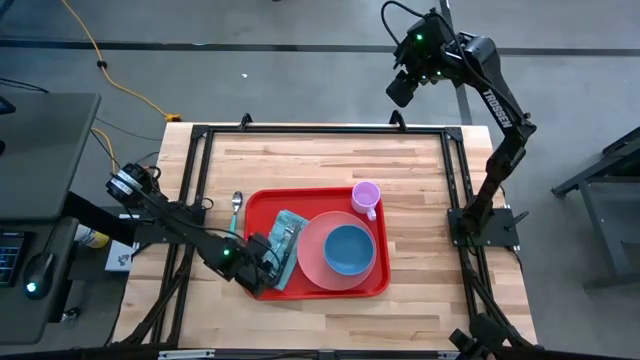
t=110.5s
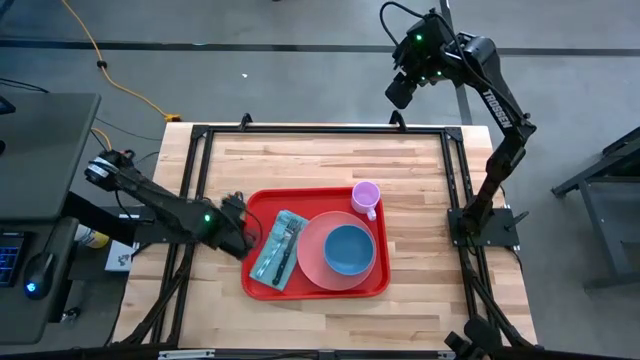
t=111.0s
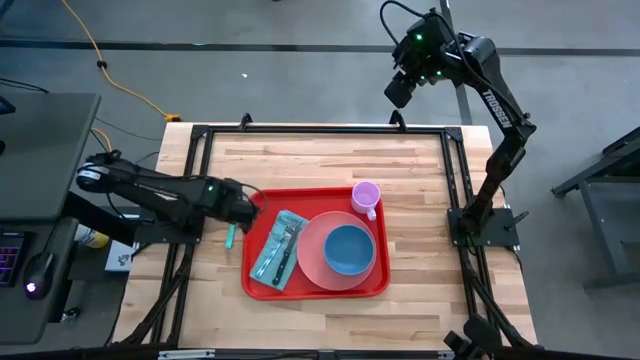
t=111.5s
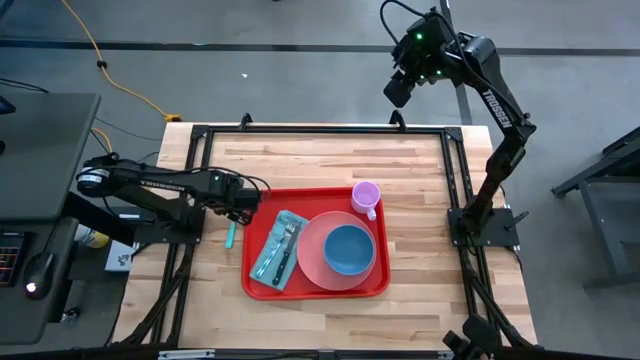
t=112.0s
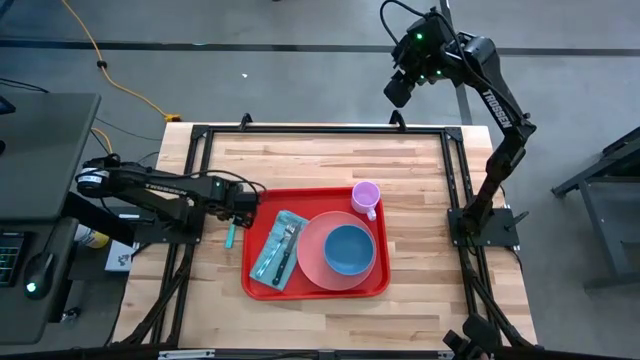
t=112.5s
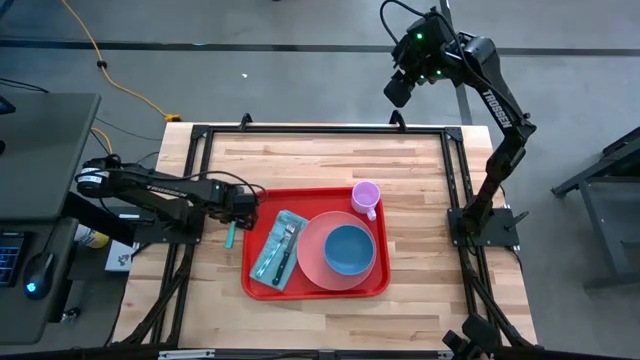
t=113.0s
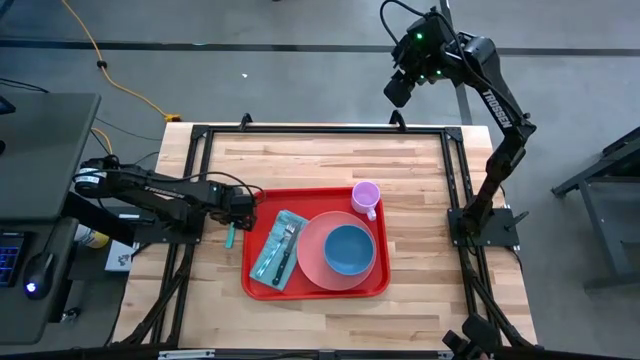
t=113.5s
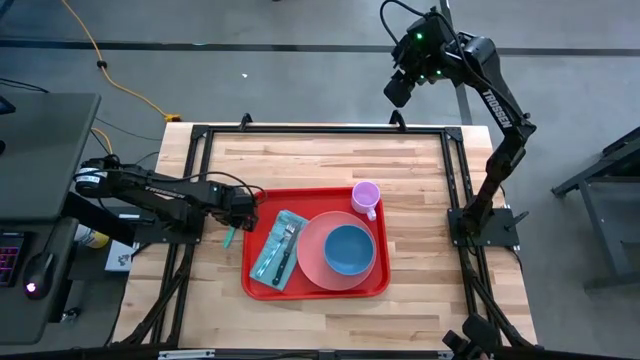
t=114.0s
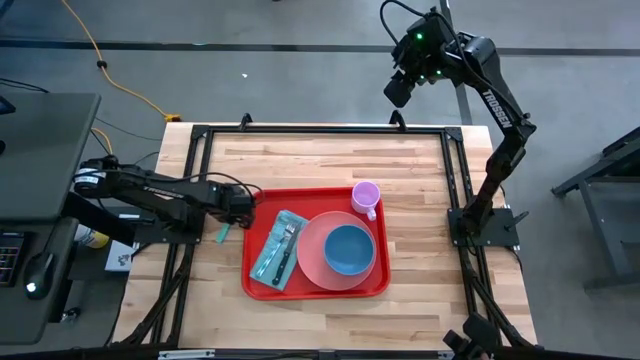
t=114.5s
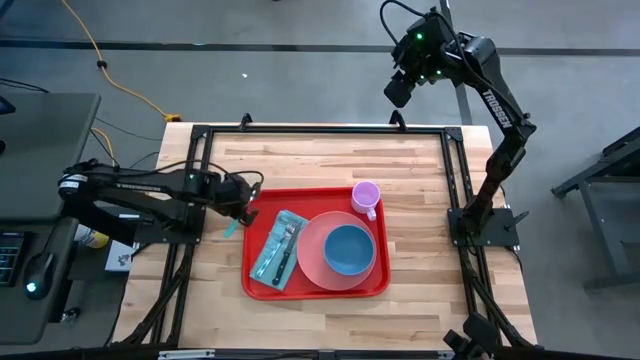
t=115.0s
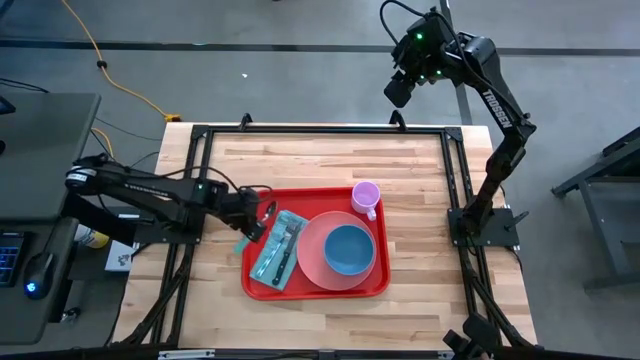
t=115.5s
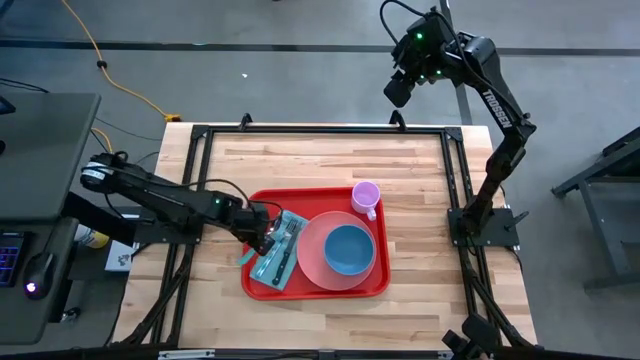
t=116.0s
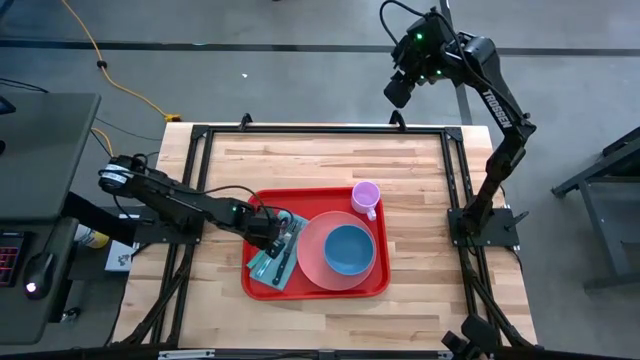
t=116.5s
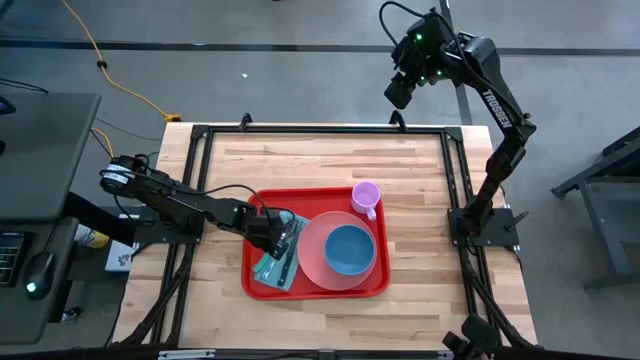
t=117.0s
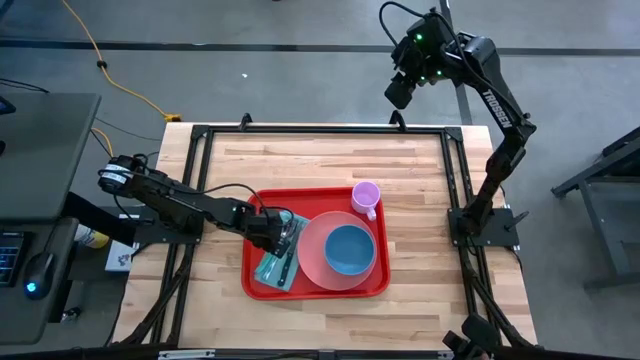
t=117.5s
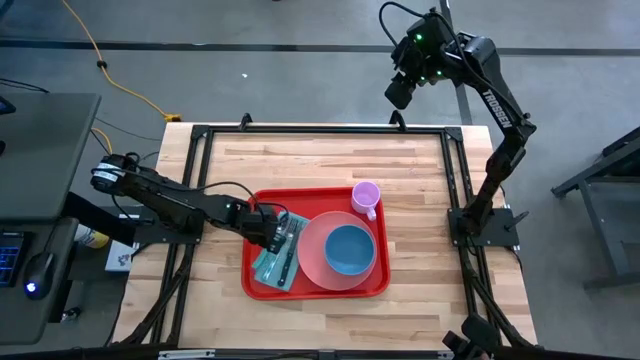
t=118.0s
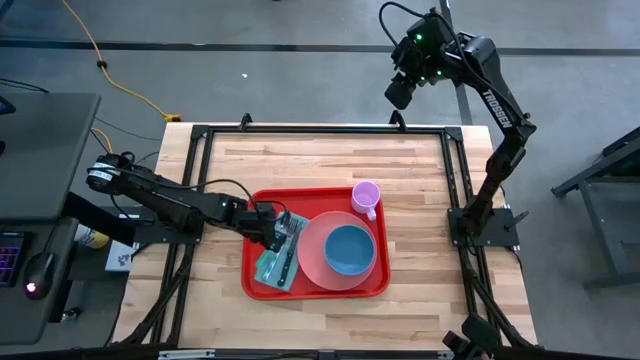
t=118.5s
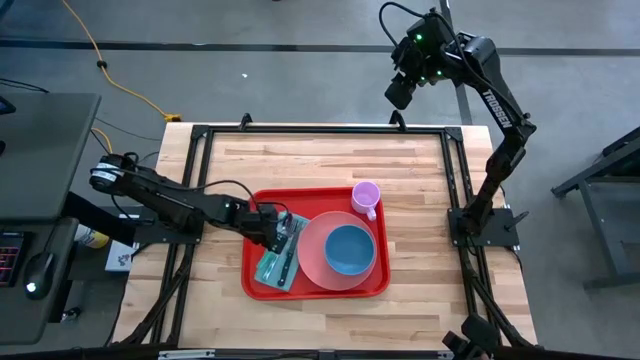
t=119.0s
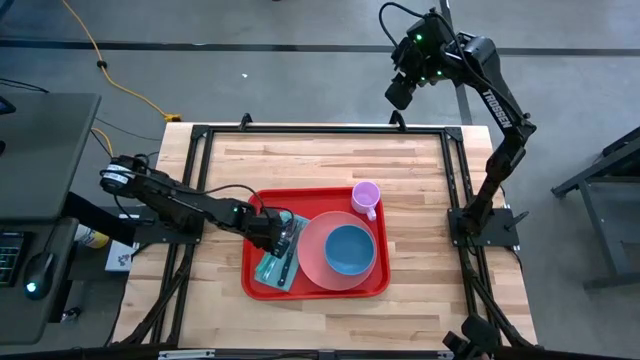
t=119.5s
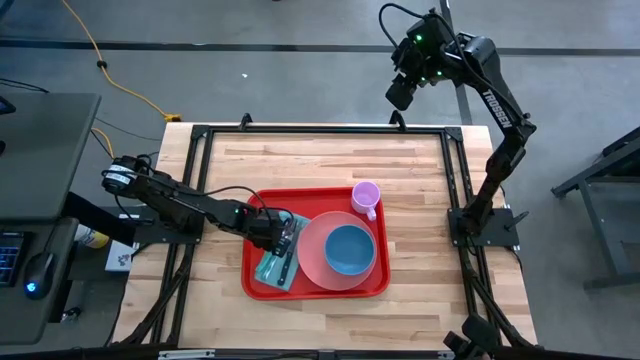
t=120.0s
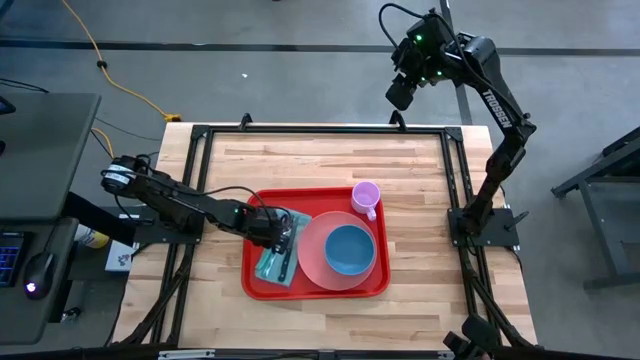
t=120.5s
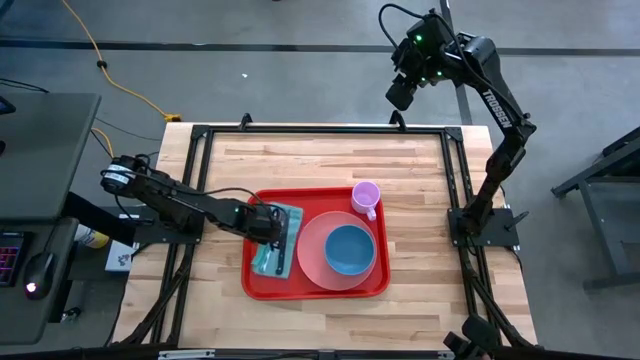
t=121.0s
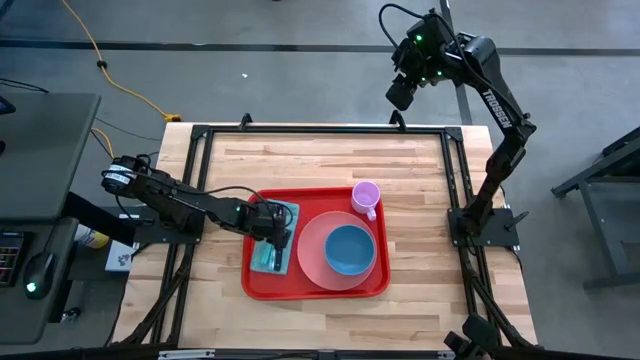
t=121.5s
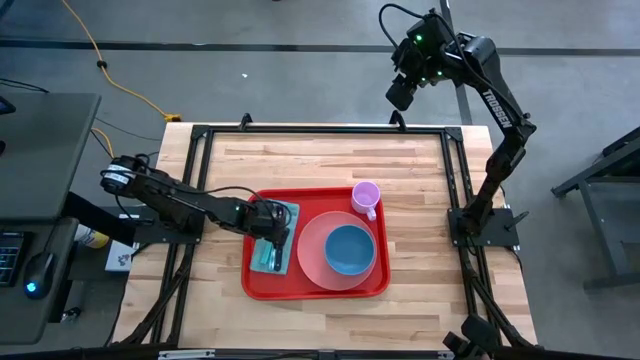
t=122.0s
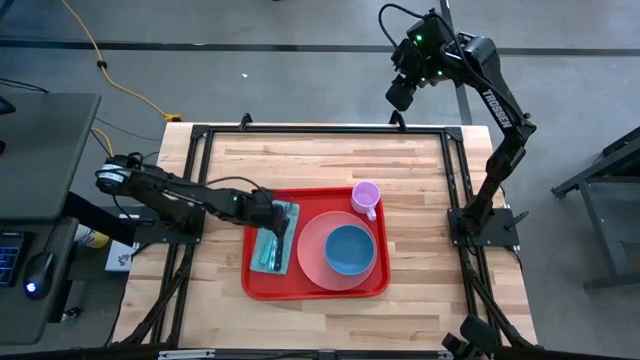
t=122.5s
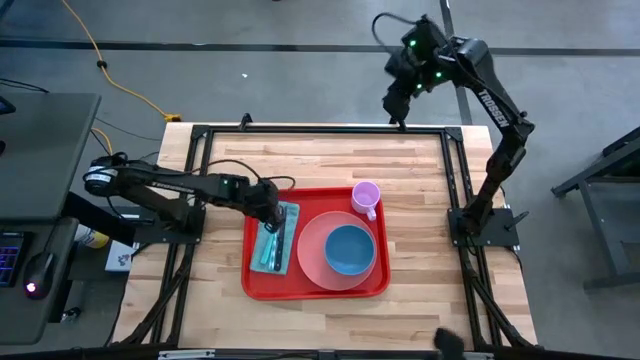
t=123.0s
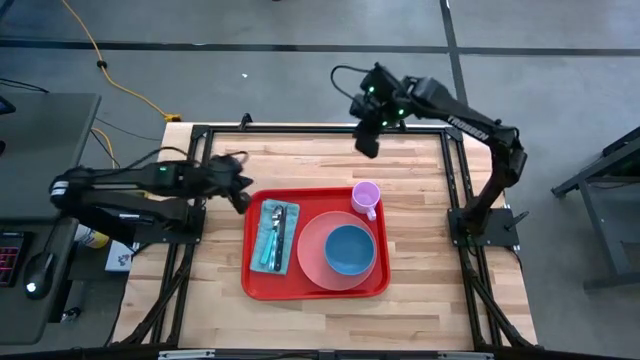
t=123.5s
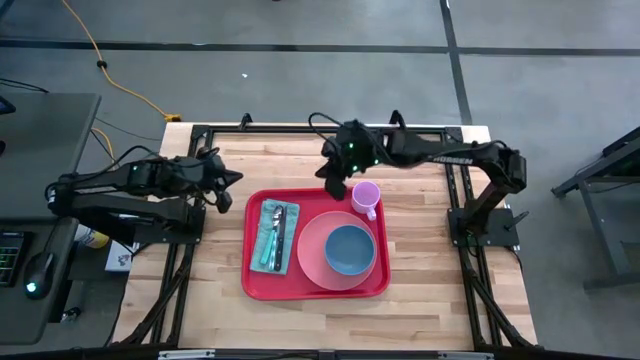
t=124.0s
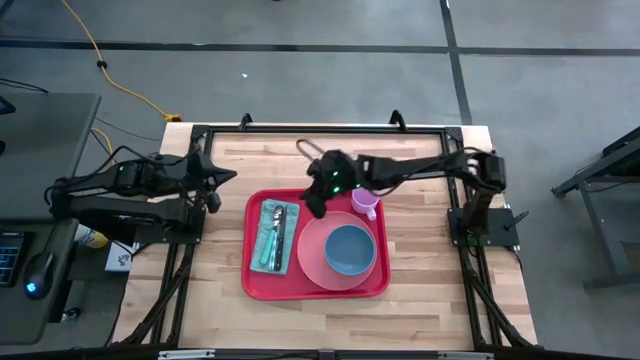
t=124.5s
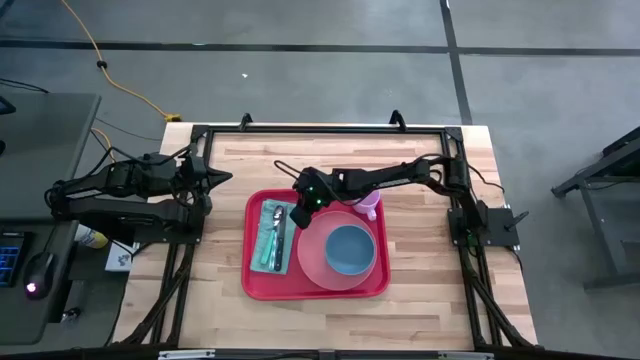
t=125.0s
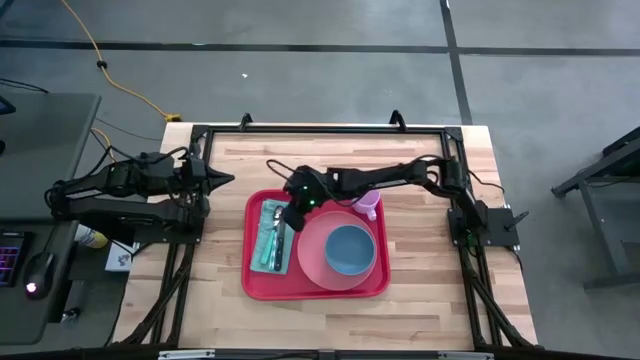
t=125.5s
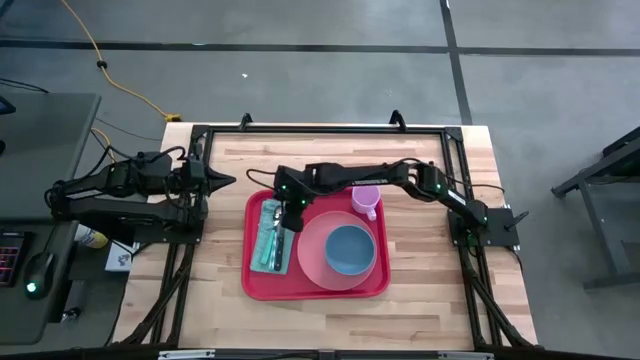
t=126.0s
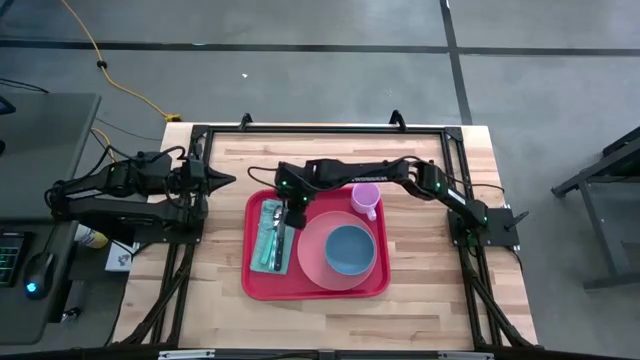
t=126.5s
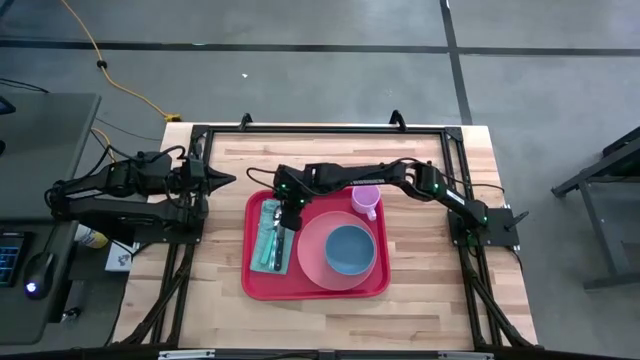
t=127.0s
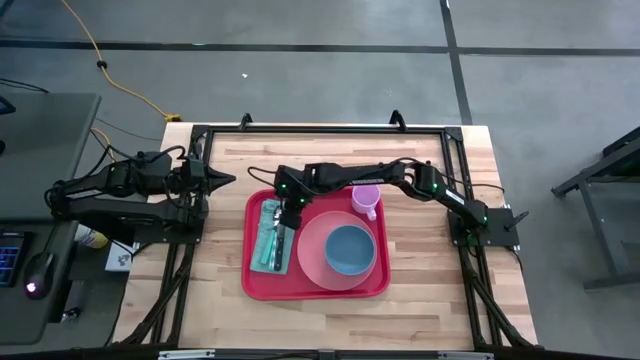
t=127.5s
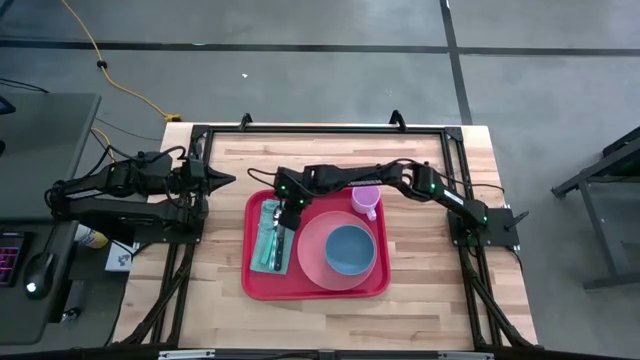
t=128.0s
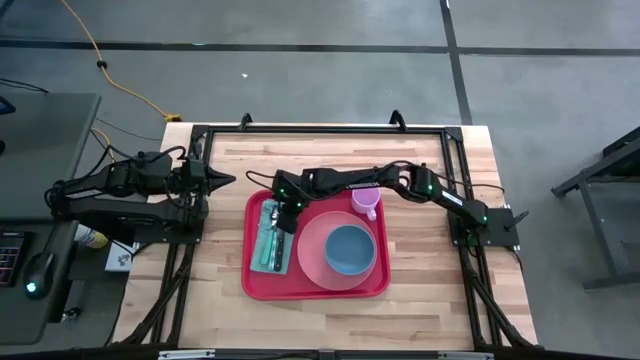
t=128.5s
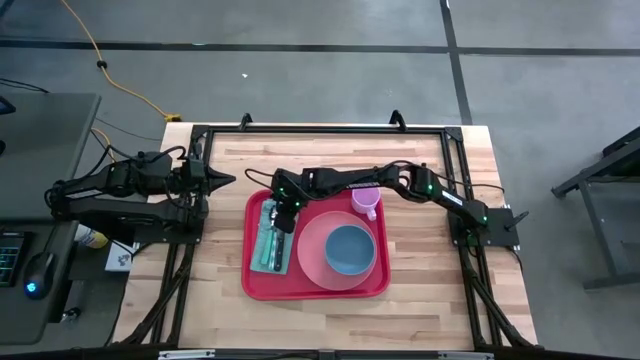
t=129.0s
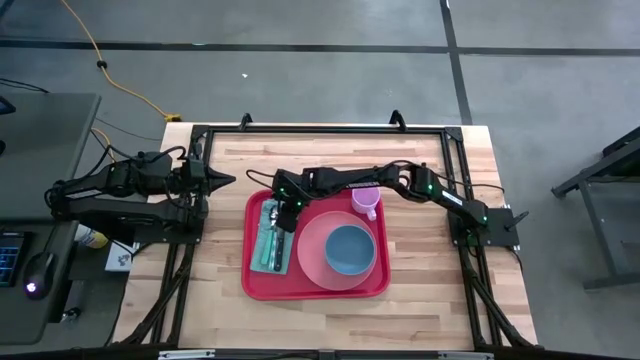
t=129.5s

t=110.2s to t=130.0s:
Task: Set up tray
Put the light green spoon on top of the blue napkin to the left of the light blue fork
